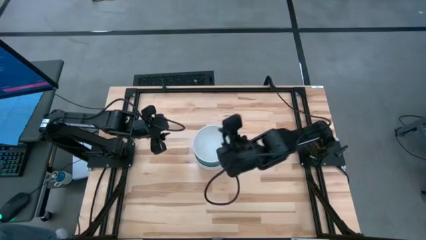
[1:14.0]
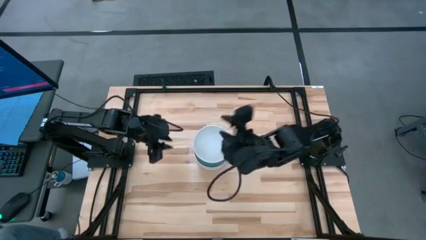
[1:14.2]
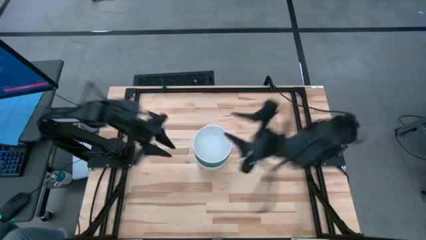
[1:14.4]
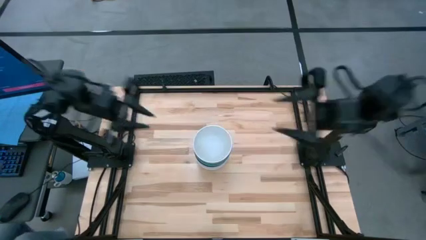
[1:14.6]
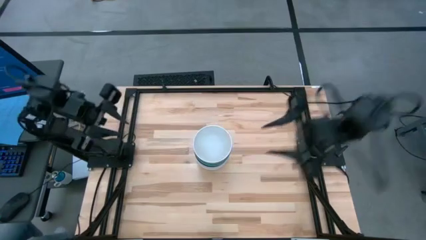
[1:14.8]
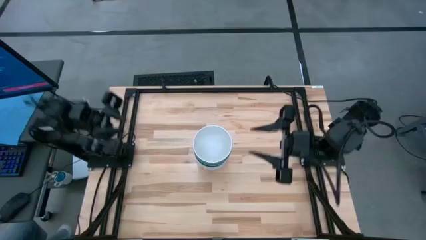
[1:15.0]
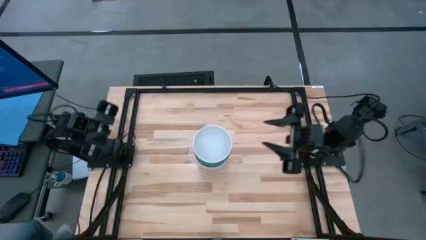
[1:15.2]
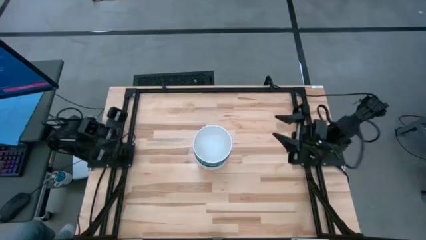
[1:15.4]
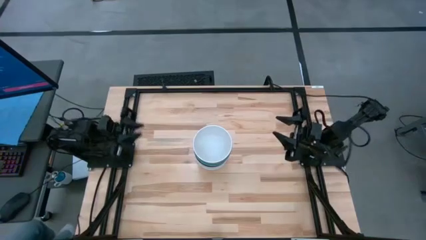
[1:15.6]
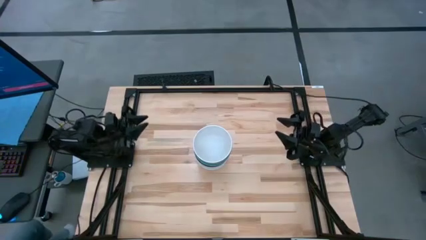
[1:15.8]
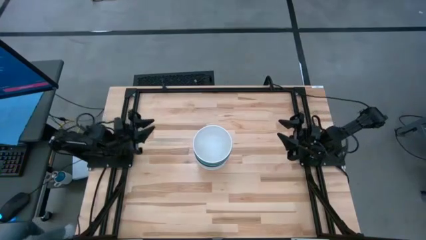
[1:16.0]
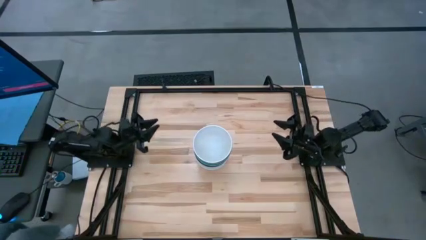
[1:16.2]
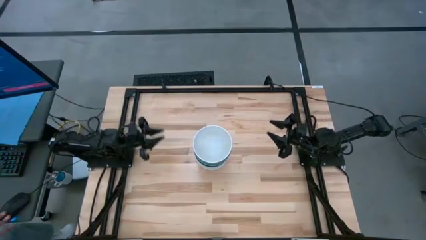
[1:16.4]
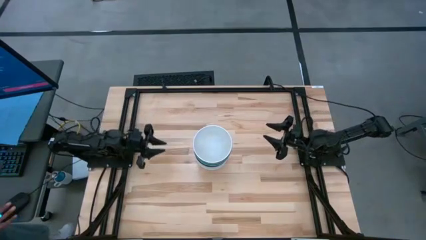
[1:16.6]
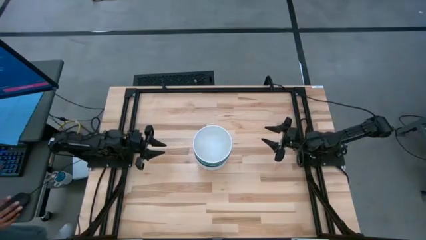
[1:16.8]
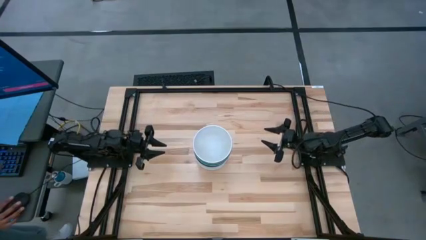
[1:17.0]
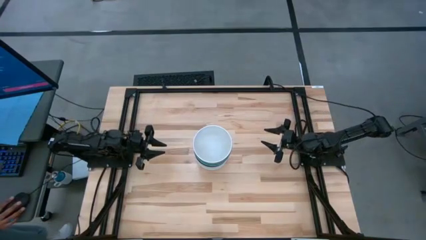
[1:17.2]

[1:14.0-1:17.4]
Task: Nest bowls inside each other
Return to Home Position

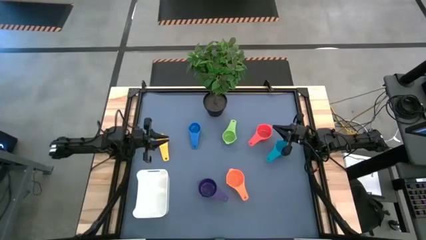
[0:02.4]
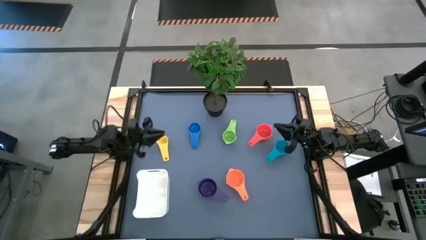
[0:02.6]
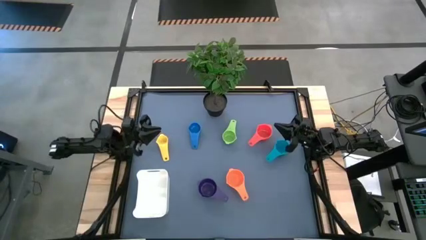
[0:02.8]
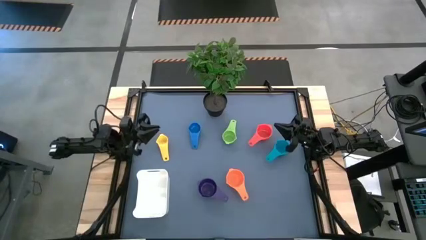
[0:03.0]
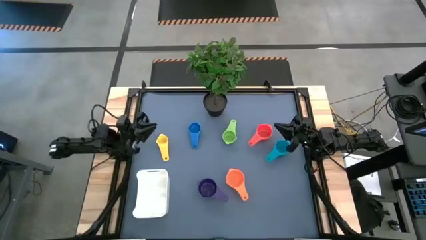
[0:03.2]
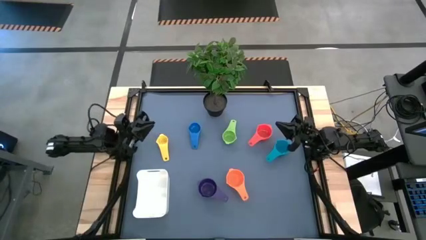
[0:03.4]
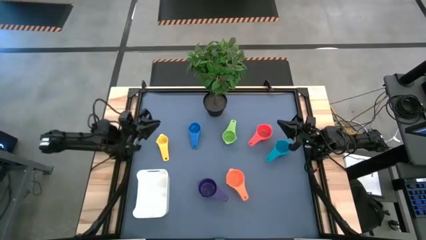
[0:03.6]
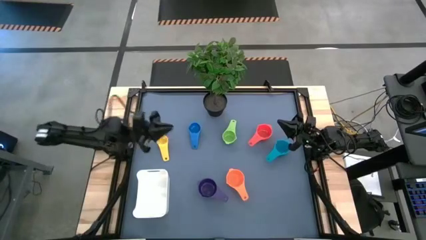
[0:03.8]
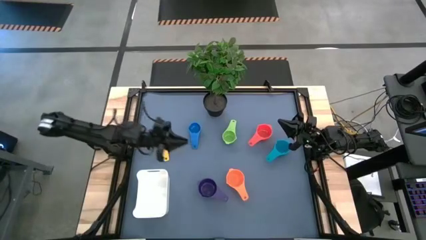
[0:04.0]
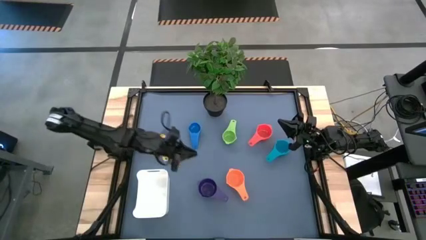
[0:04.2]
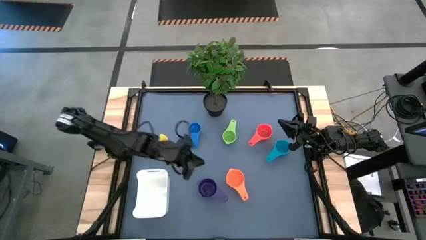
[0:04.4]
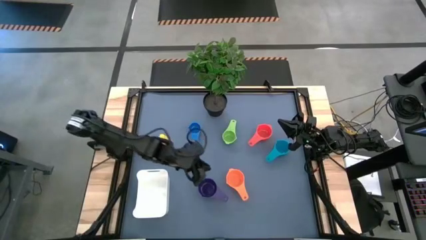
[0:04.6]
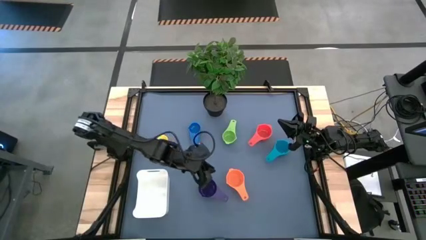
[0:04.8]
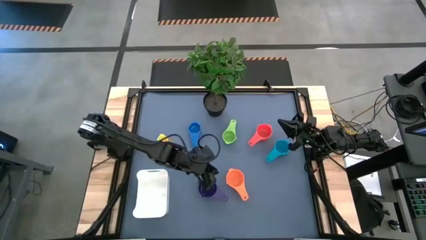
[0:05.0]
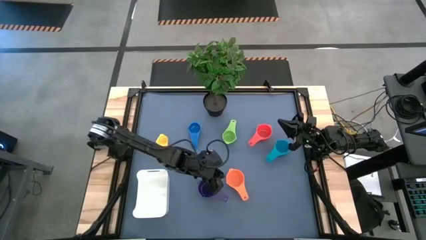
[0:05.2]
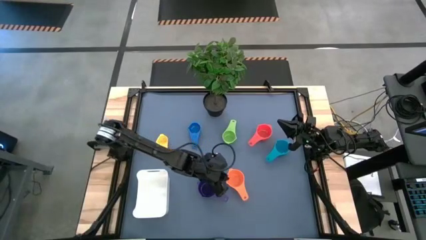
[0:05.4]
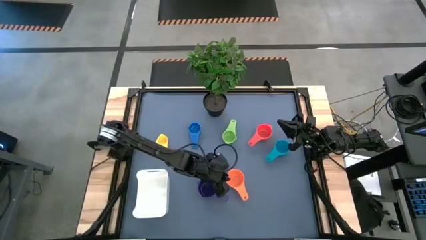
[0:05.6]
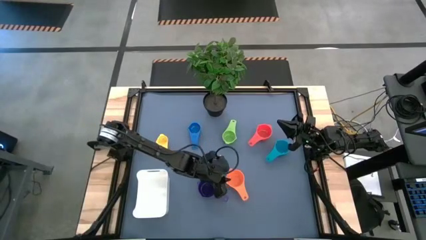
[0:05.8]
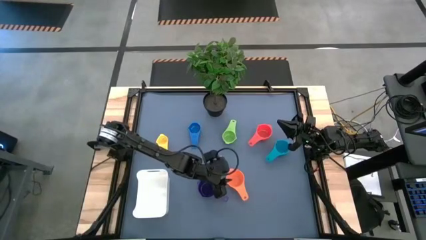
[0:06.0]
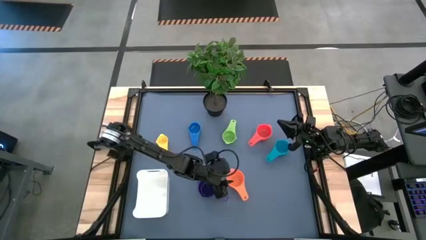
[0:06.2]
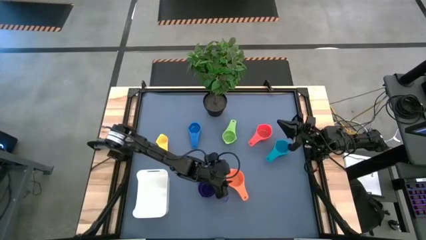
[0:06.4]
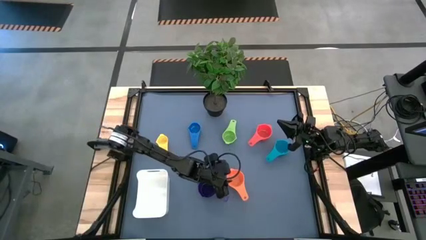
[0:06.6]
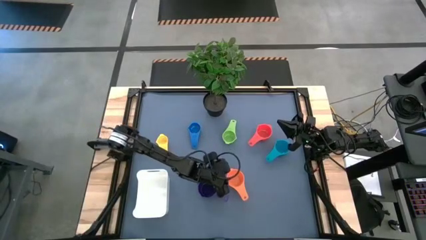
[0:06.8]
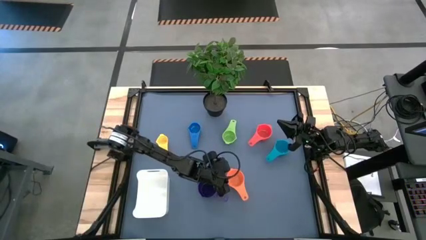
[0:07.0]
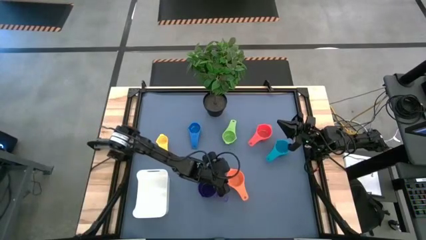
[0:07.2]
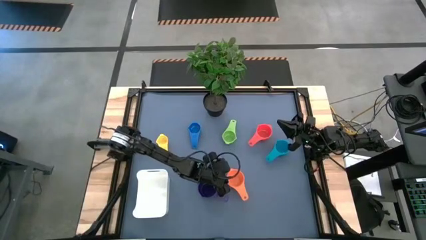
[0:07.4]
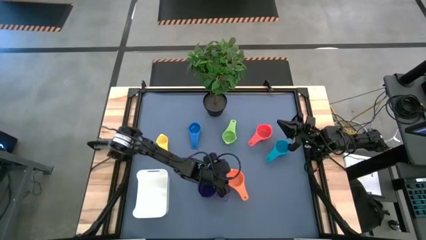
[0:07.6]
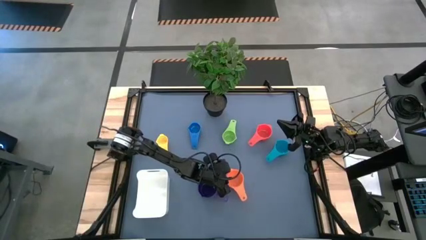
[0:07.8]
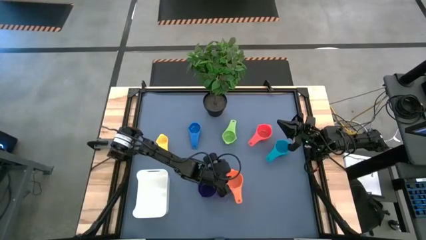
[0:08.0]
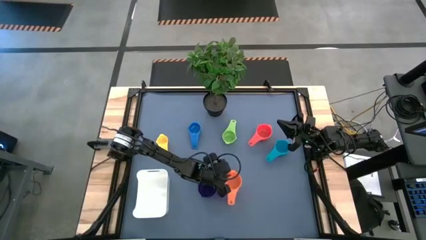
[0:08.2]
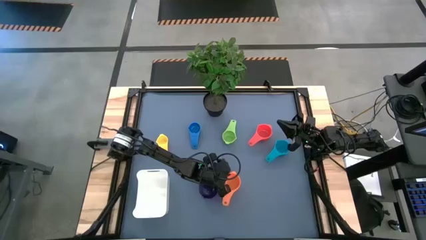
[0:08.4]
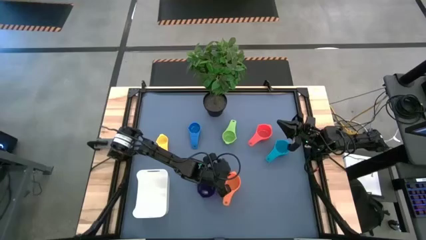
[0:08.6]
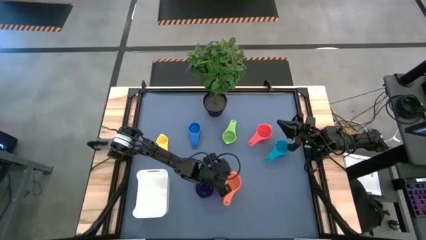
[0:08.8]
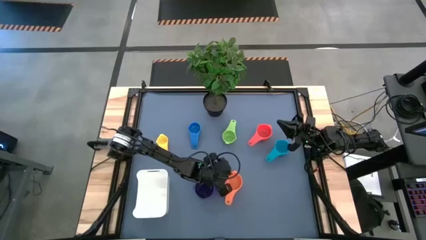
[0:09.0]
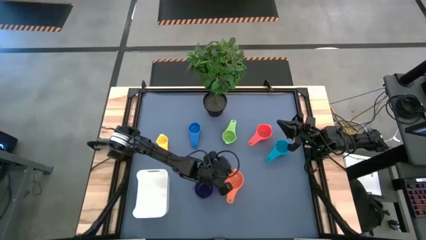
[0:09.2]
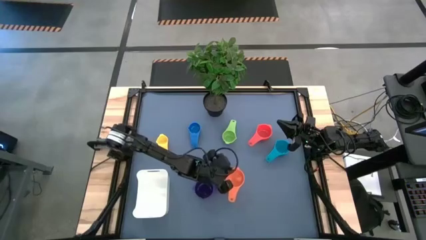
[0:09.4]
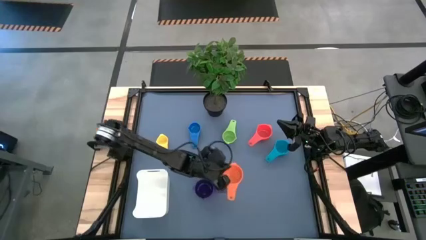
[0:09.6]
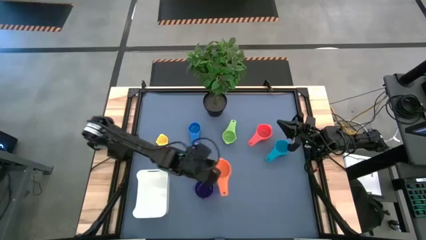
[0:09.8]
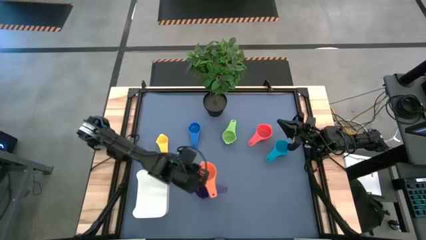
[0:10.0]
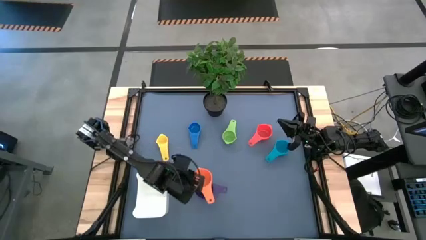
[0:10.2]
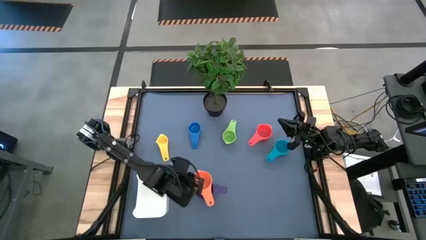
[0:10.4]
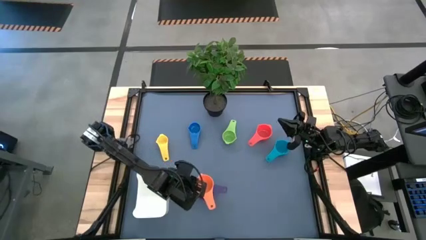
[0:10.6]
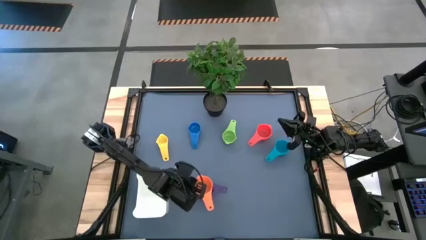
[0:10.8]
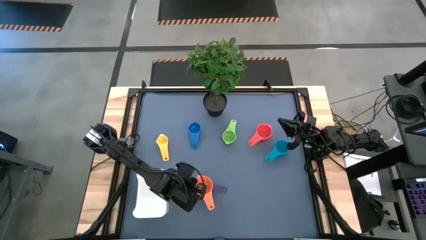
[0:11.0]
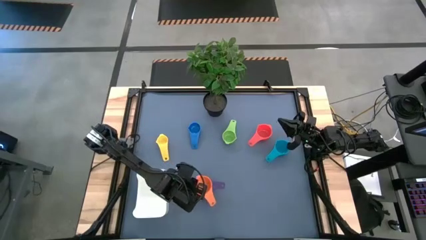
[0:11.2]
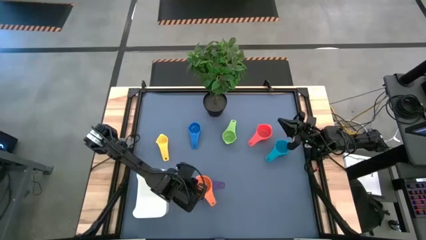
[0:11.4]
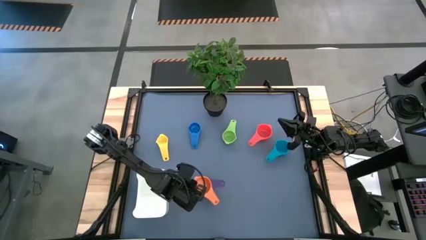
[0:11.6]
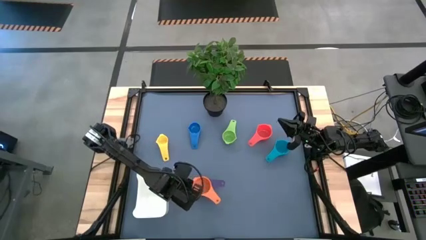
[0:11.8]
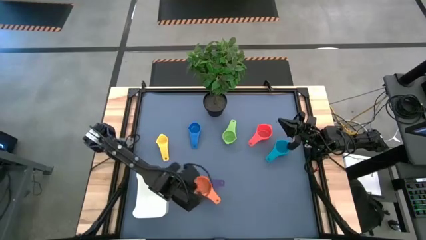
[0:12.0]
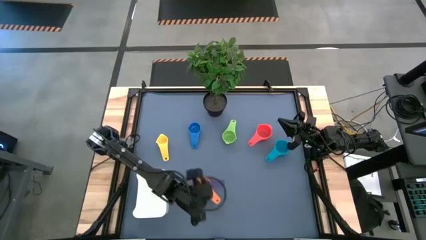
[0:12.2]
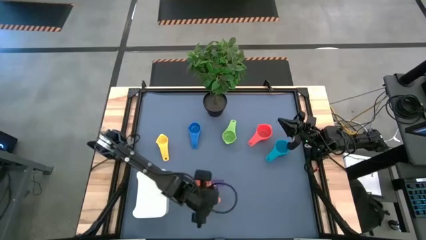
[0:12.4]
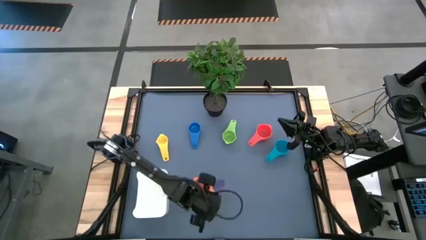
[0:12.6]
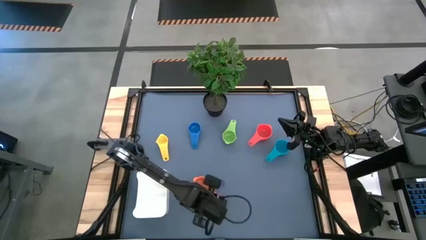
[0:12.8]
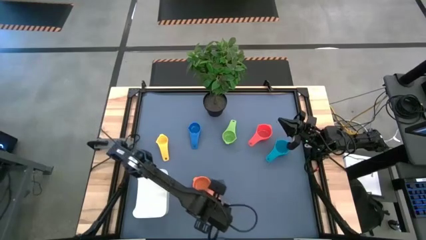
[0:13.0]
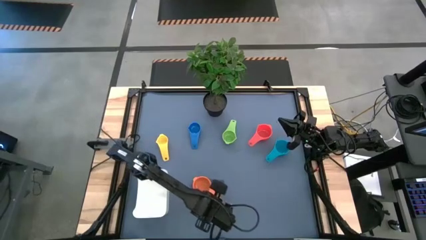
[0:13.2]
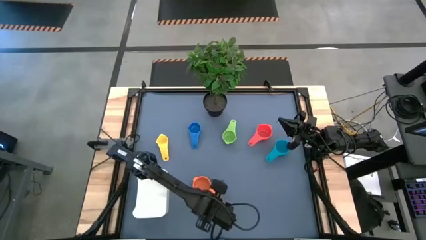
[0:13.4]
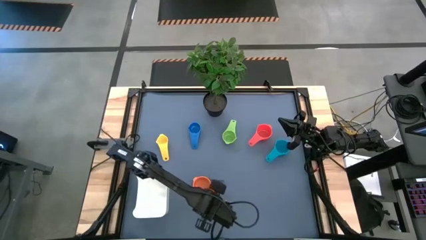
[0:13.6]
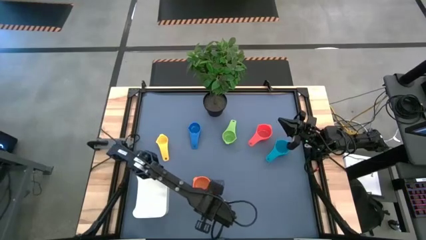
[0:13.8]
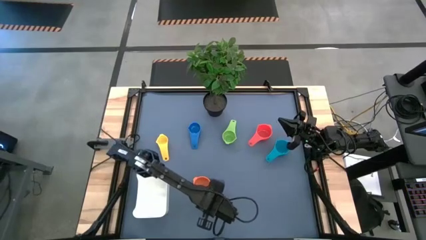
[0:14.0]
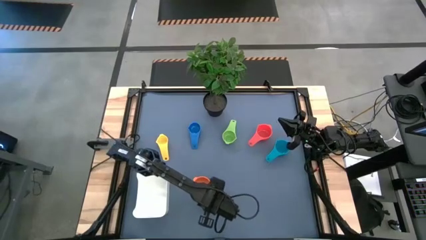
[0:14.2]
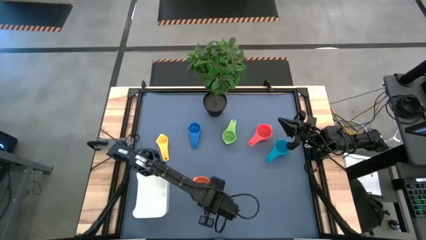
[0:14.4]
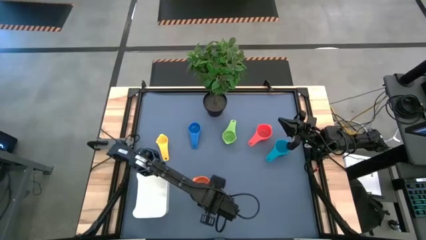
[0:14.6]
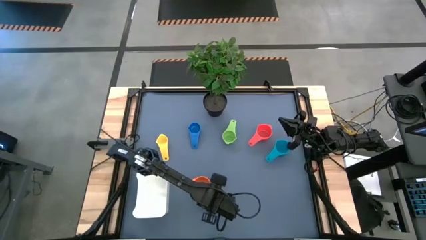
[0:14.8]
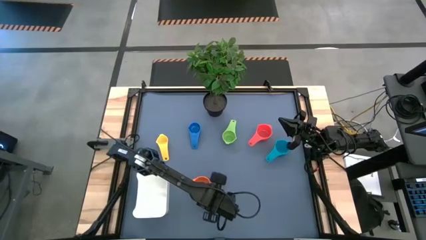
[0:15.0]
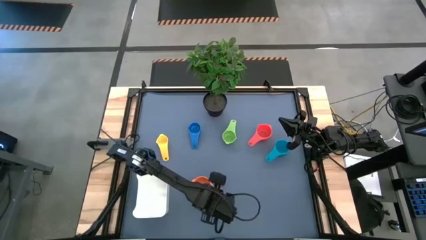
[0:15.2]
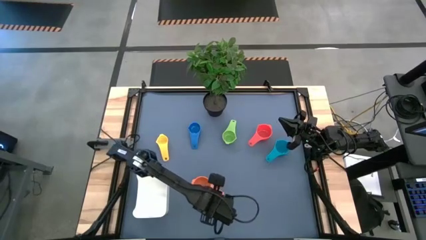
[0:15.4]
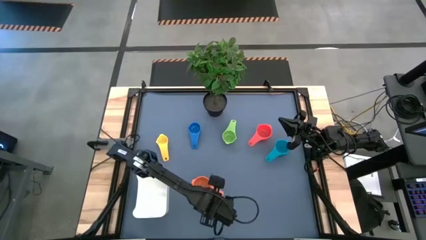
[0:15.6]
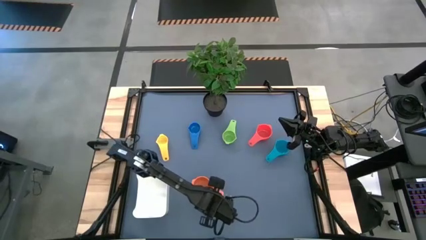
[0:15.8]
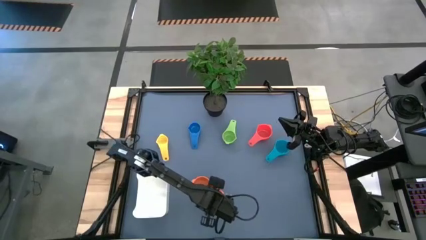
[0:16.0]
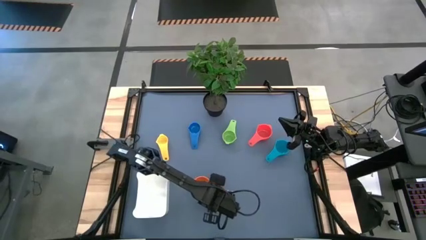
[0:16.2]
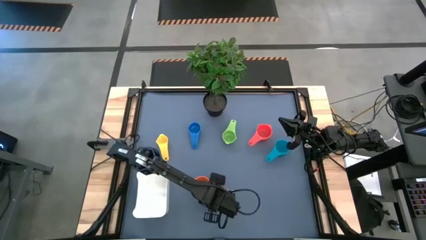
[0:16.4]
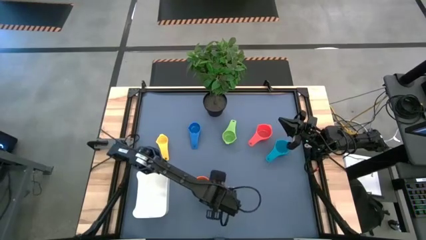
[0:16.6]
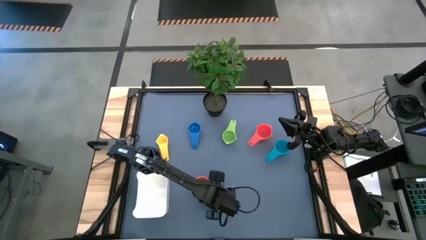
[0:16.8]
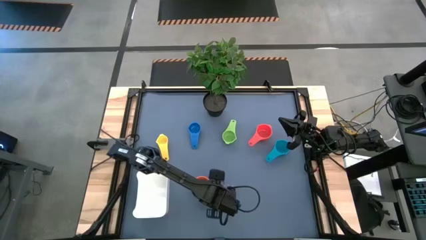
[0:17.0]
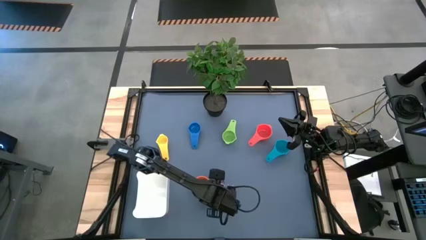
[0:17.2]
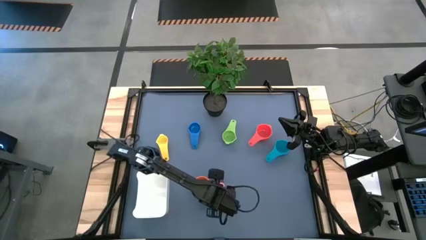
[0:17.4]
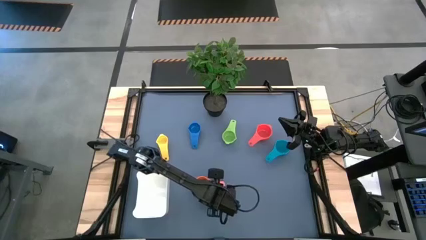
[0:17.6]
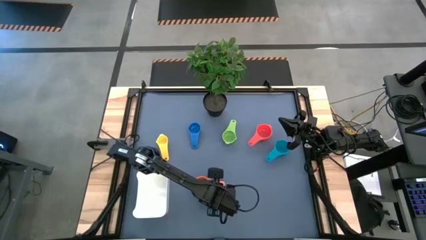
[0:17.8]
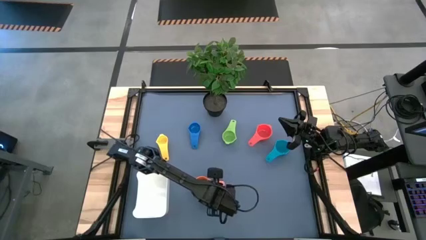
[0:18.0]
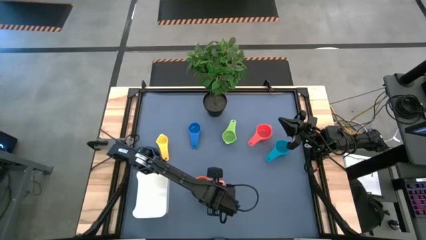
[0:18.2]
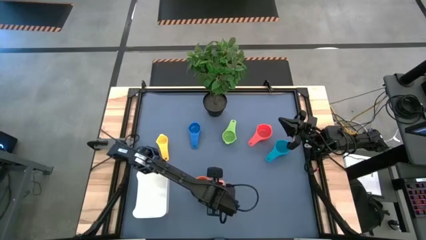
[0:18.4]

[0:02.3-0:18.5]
Task: Nest measuring cups in basket
Stack the orange measuring cup on top of the violet measuring cup
